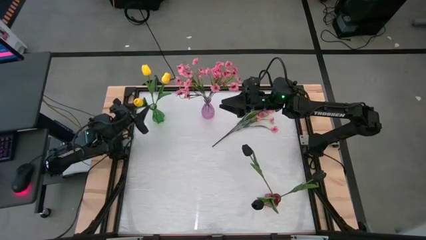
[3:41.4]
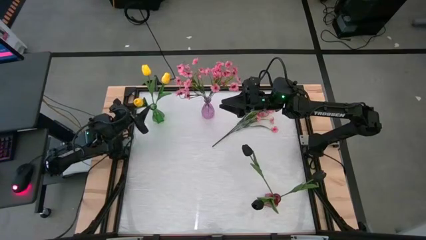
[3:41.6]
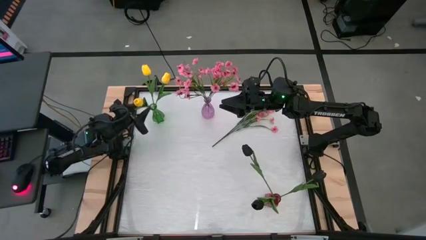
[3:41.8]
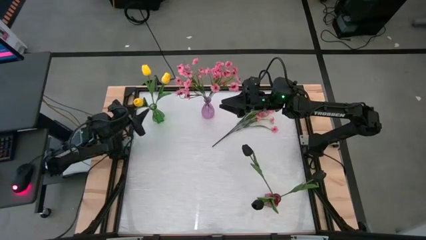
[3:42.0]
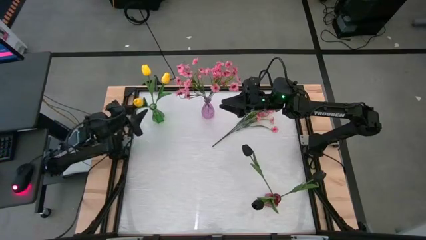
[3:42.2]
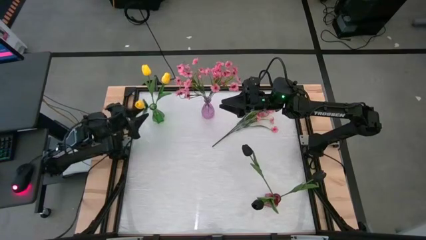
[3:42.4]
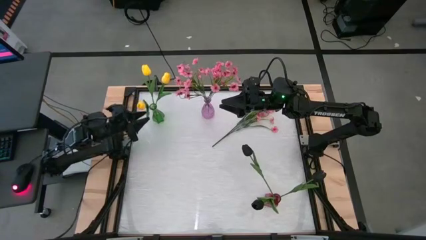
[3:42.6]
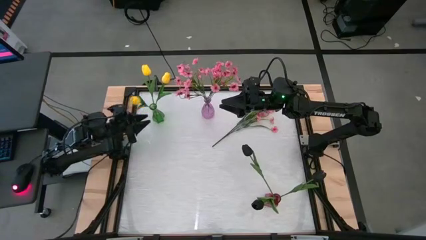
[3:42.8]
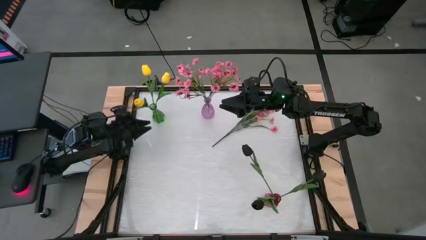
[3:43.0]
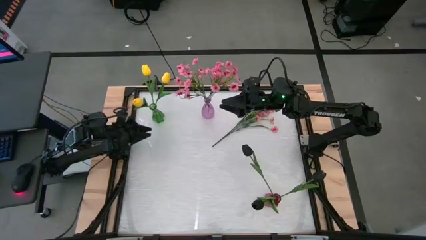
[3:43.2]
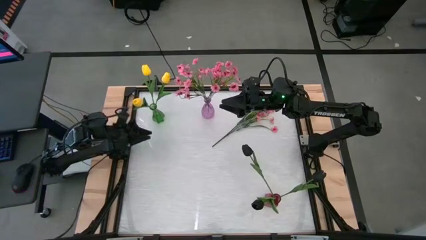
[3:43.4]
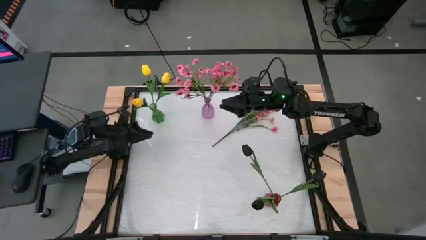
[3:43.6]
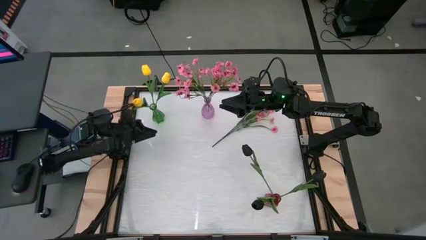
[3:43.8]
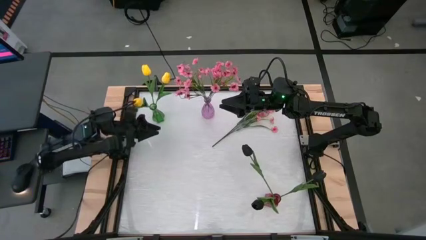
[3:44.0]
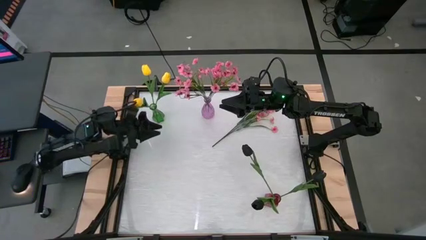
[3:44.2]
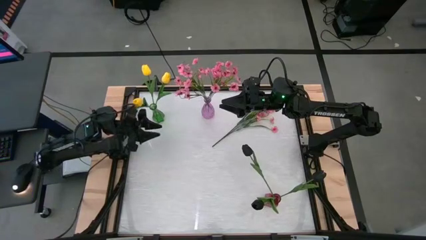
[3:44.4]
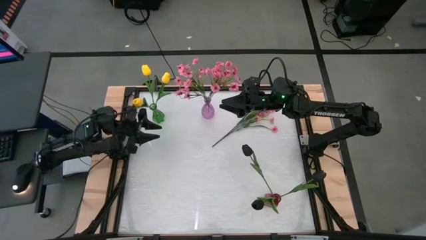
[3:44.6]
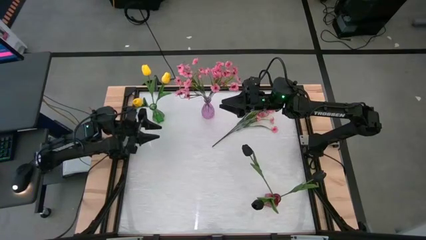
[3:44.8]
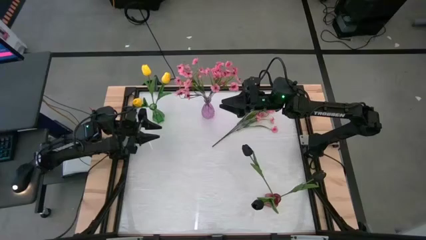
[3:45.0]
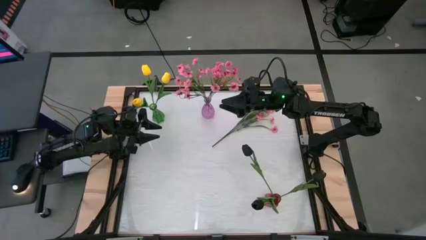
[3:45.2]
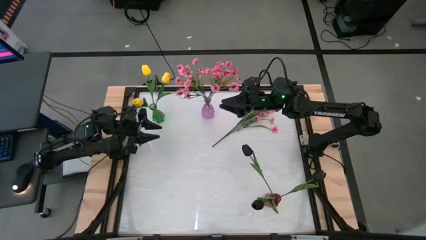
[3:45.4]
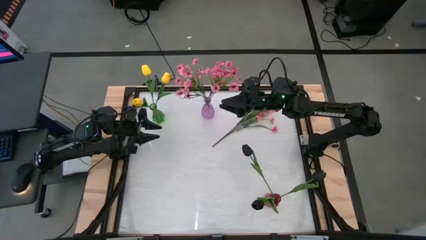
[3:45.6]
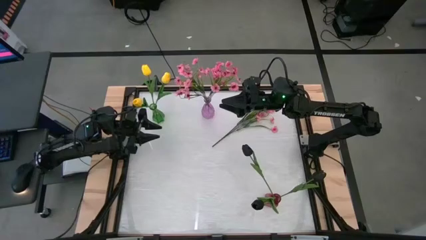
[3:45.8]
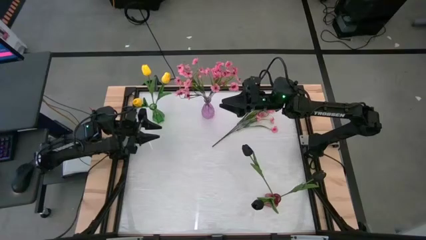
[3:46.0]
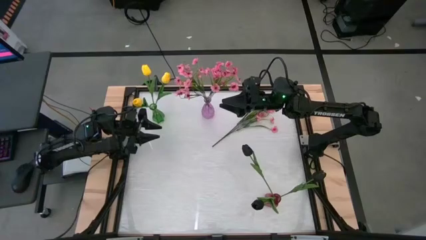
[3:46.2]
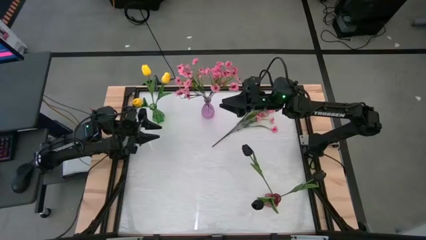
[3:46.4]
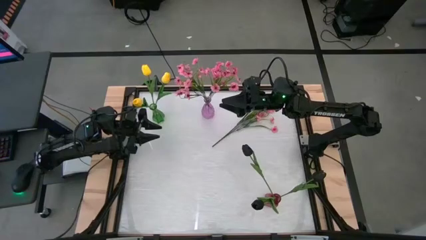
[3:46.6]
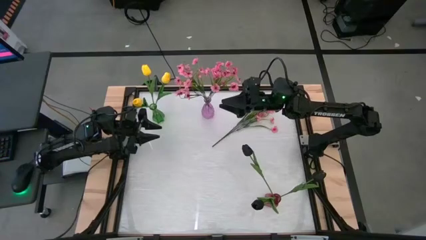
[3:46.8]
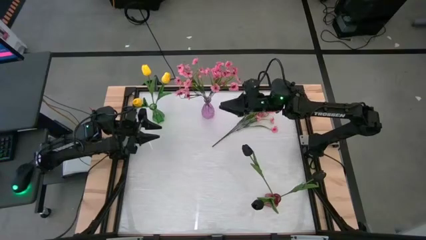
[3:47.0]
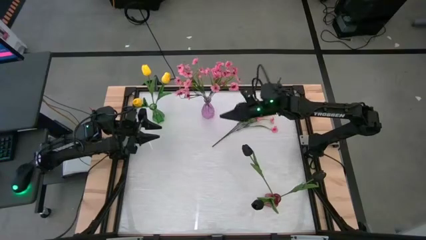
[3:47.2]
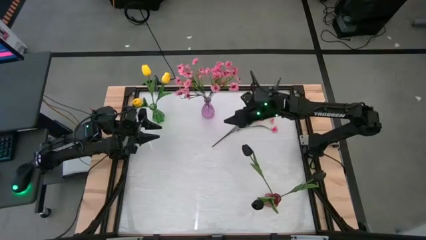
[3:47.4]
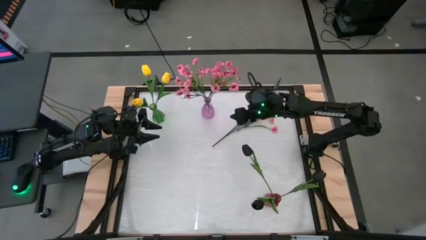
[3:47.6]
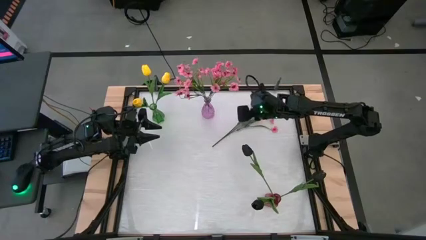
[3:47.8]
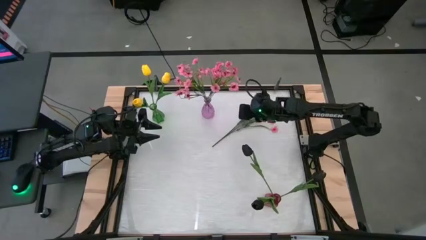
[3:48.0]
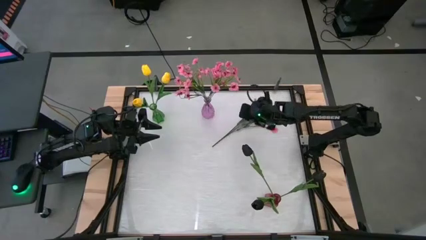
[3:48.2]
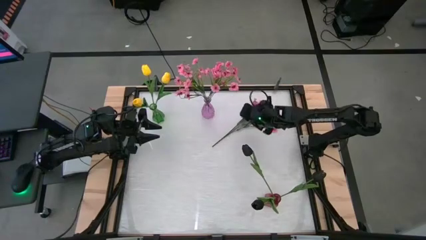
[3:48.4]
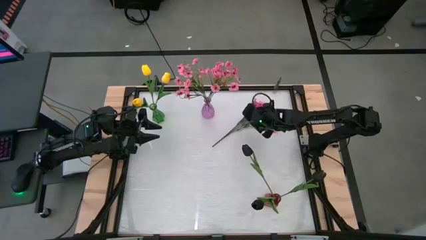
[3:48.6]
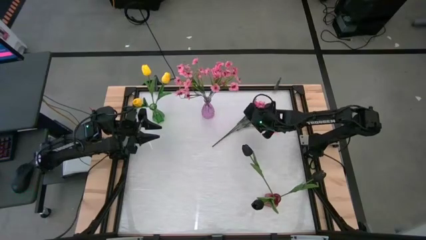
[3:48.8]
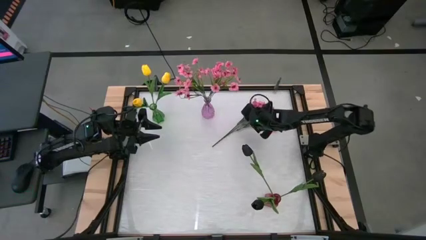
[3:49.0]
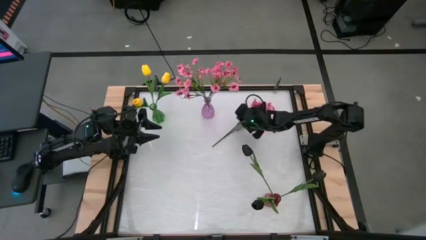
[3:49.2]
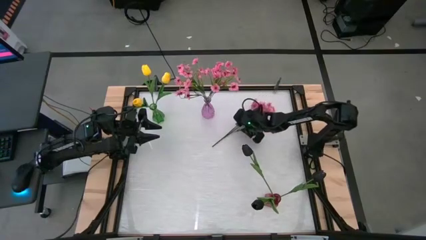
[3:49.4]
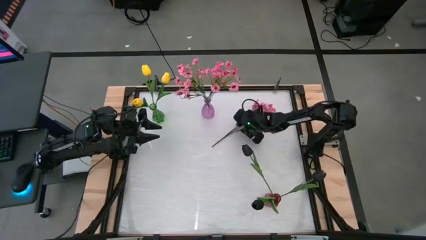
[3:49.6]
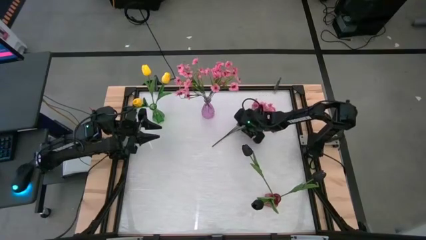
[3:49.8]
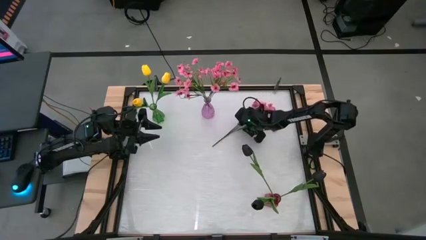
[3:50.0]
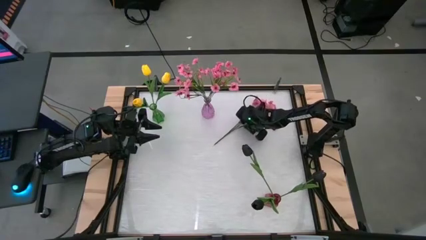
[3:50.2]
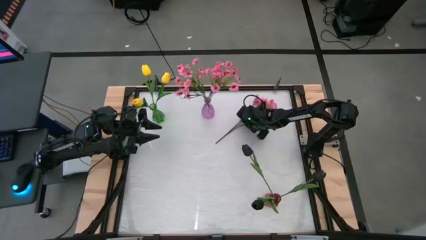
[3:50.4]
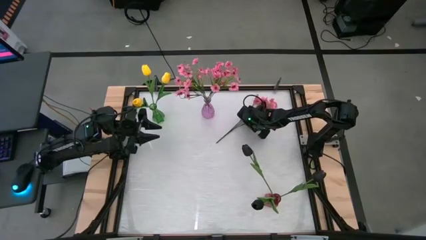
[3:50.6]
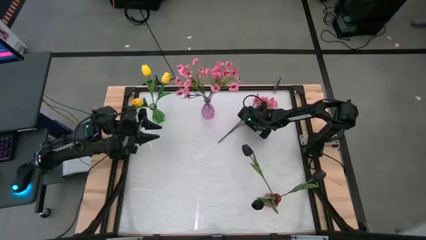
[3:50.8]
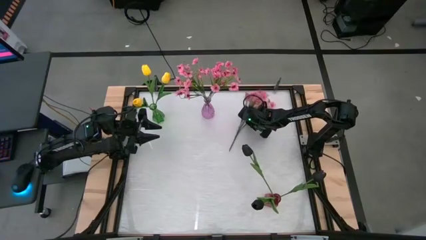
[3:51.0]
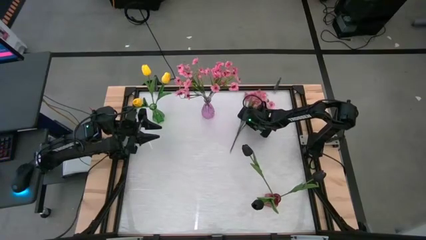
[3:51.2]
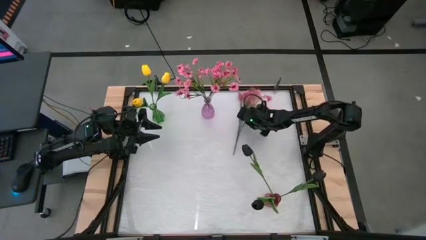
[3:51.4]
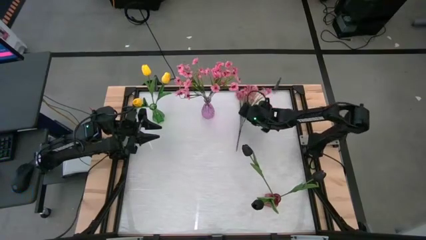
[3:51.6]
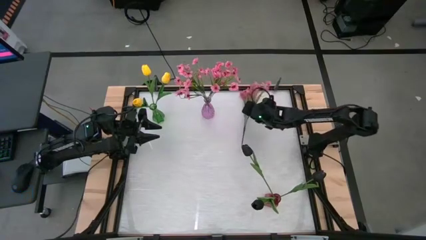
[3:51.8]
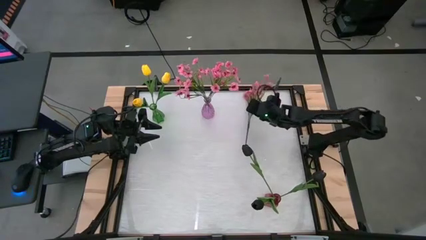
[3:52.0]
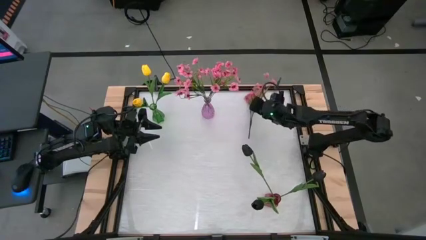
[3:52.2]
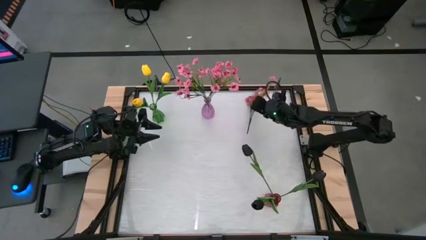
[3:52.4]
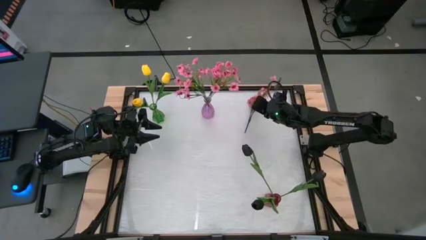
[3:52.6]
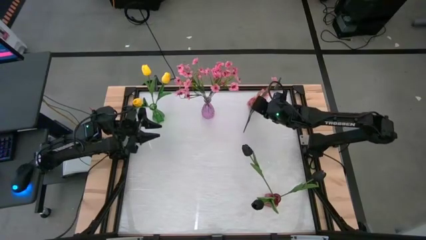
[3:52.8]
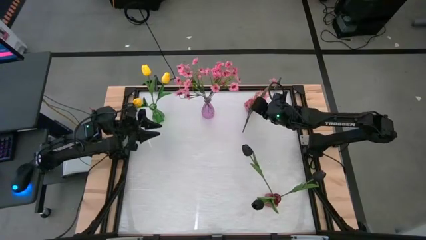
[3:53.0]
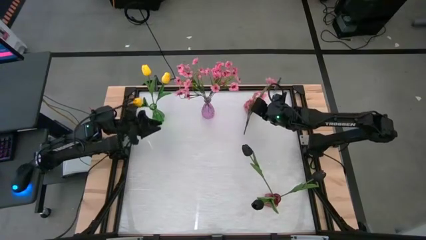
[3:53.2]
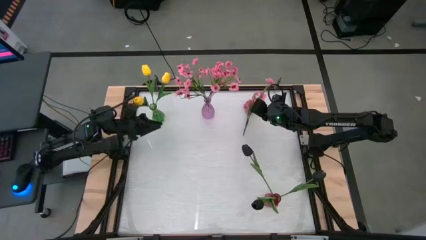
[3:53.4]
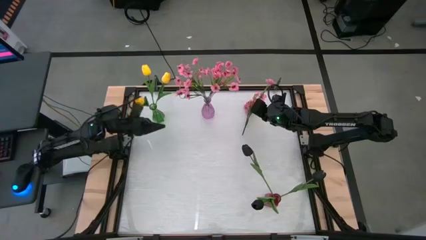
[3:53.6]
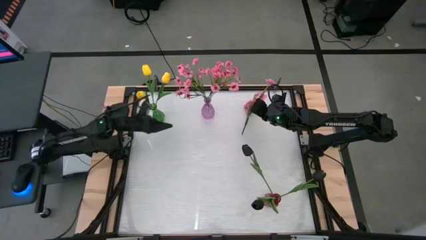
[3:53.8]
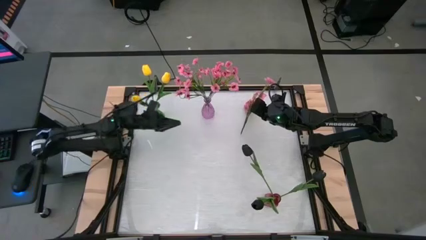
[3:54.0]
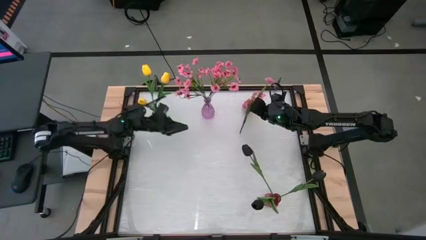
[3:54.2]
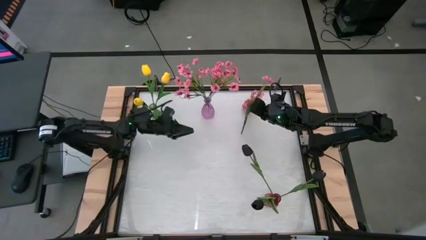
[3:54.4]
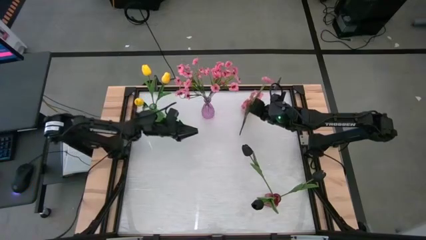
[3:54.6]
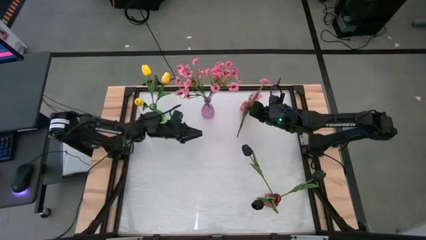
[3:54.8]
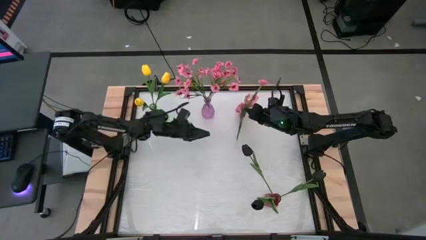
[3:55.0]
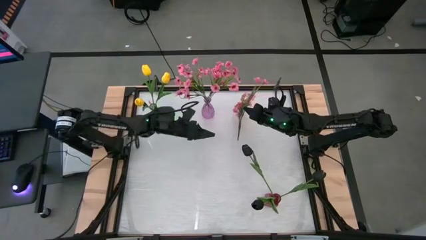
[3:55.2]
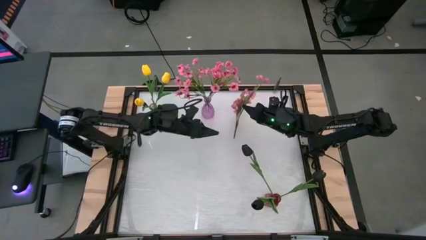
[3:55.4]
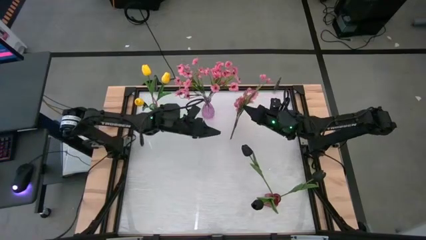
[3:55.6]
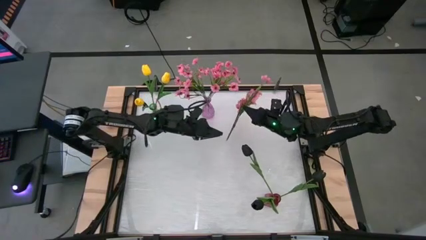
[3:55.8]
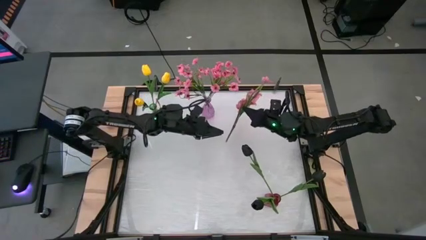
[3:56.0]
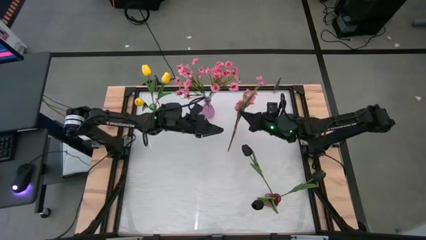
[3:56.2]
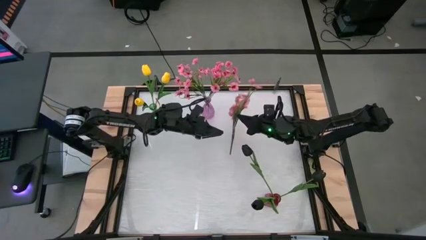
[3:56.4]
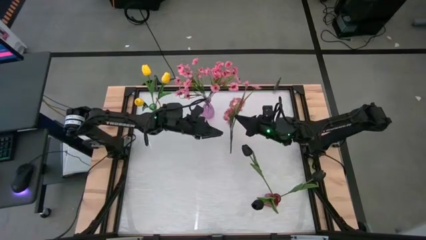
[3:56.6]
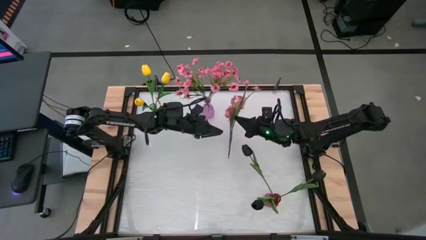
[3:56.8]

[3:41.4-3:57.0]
Task: Sort flowers into vase by color
Put the pink flowers into the purple vase

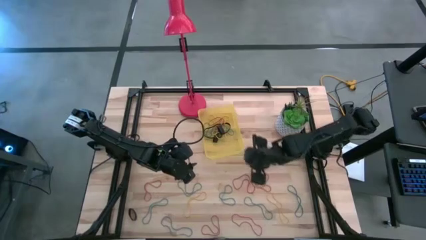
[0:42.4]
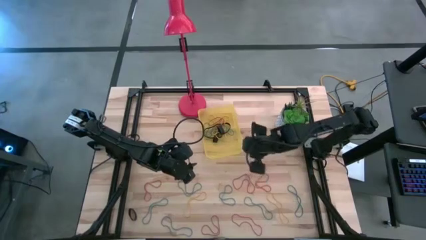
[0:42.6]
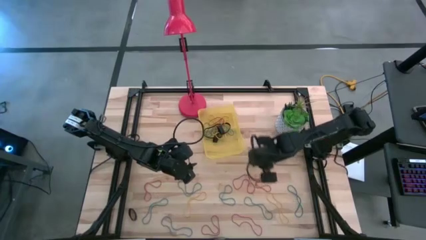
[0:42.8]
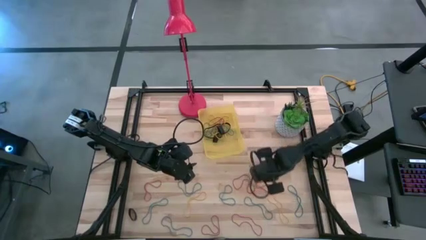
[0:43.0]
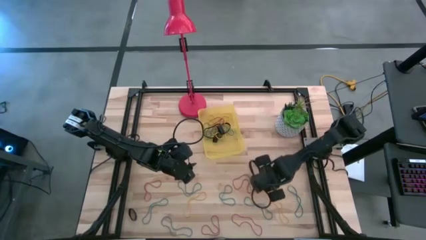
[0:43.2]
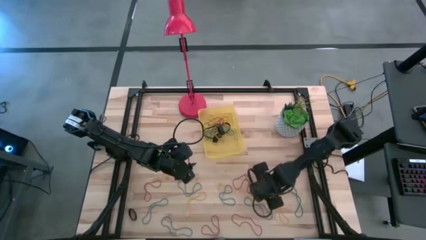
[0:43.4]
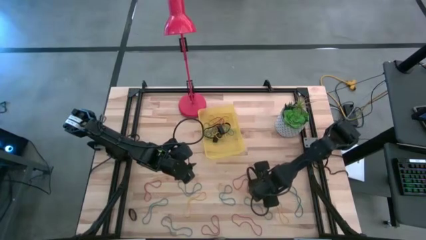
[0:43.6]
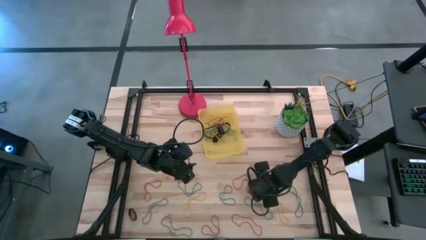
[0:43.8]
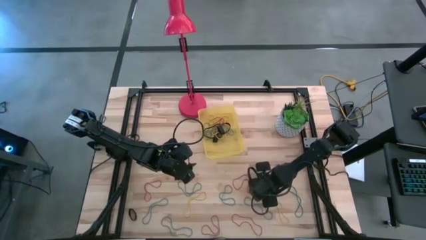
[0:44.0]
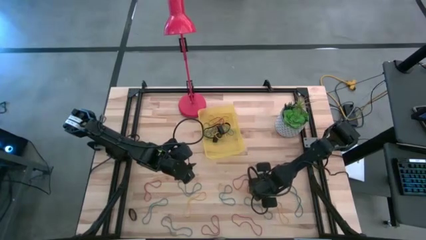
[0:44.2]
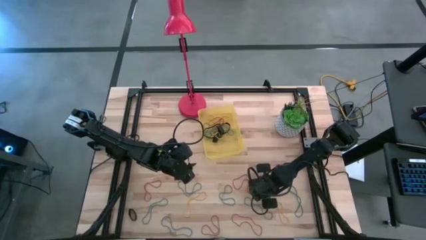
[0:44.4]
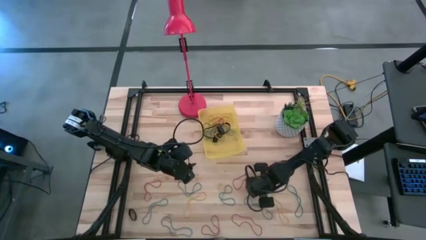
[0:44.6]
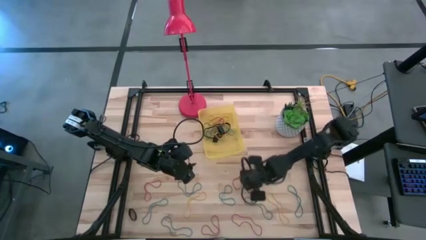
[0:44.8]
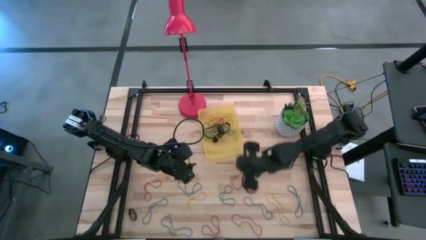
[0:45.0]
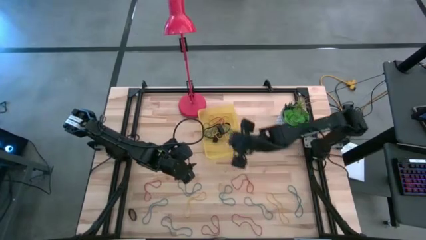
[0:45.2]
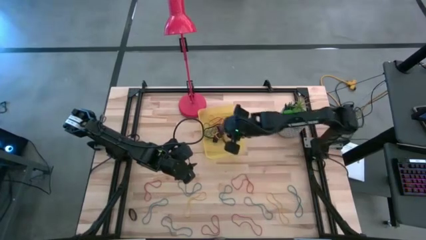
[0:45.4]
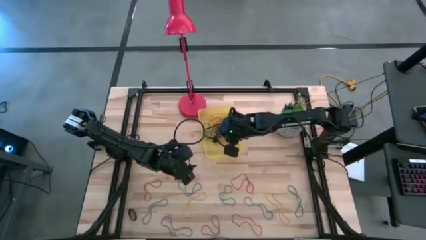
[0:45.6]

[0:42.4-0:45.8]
Task: Pick and place rubber bands into bin
Put the red rubber band into the yellow bin
